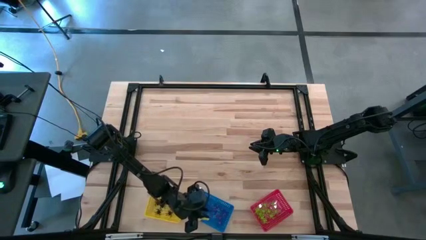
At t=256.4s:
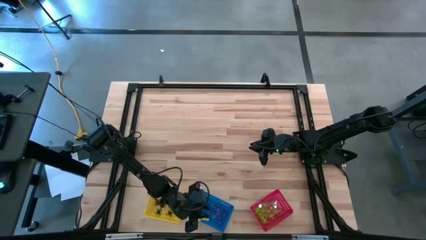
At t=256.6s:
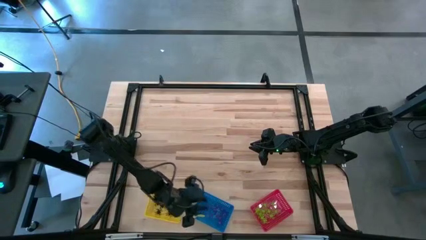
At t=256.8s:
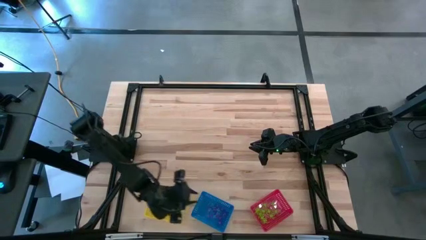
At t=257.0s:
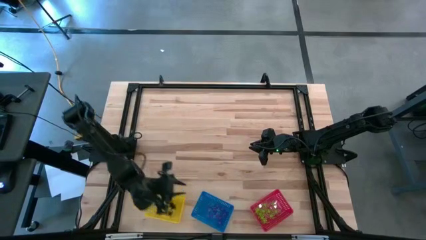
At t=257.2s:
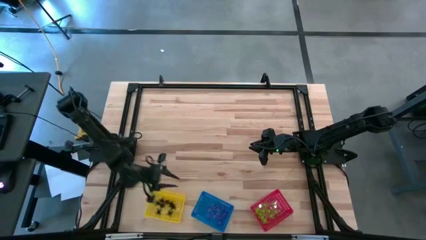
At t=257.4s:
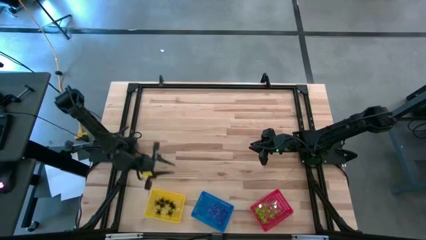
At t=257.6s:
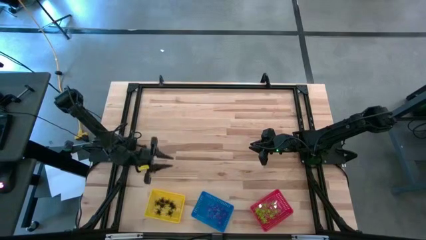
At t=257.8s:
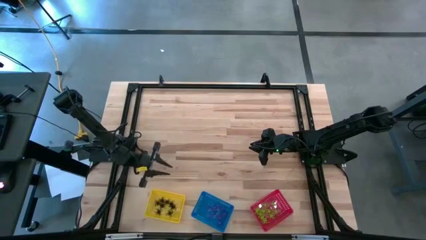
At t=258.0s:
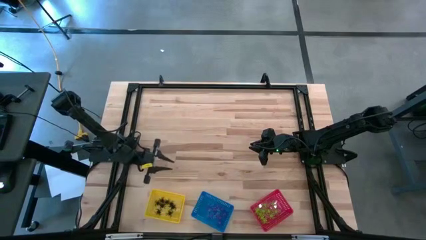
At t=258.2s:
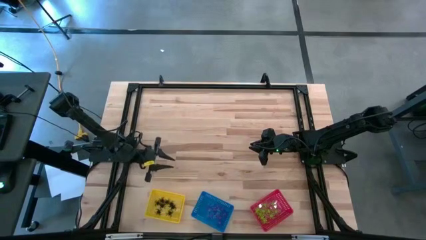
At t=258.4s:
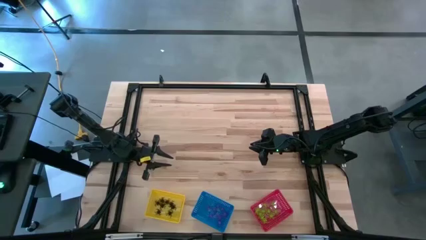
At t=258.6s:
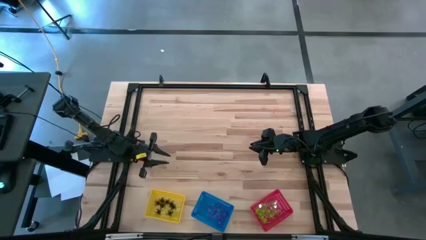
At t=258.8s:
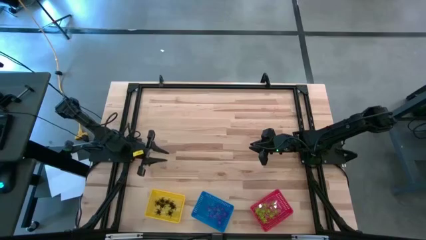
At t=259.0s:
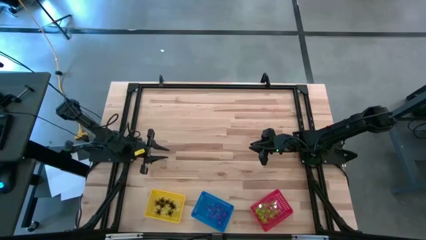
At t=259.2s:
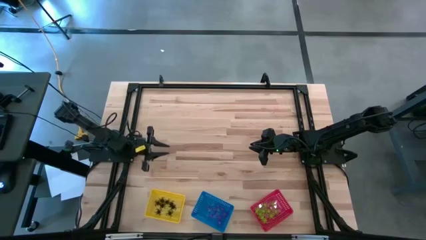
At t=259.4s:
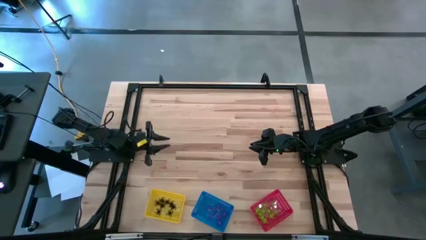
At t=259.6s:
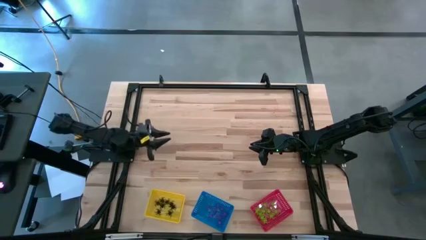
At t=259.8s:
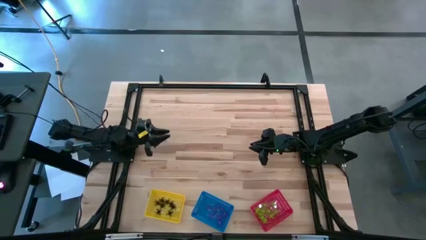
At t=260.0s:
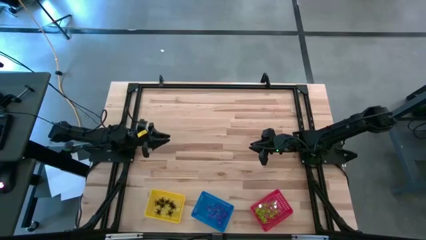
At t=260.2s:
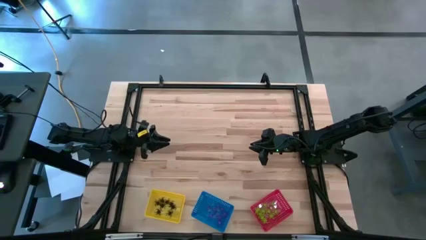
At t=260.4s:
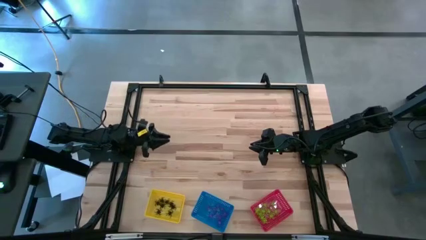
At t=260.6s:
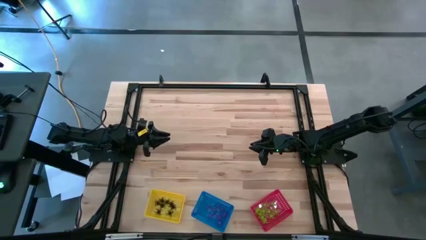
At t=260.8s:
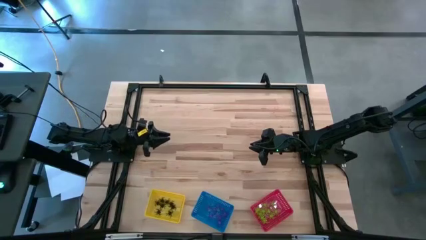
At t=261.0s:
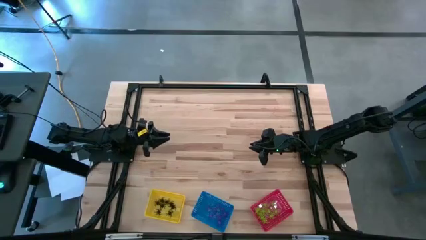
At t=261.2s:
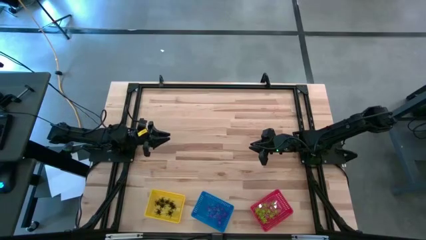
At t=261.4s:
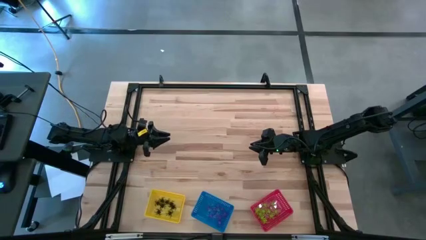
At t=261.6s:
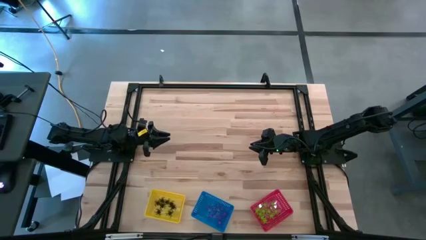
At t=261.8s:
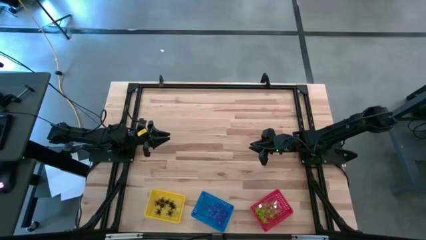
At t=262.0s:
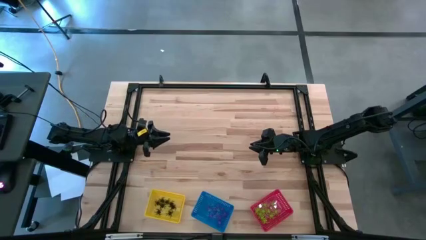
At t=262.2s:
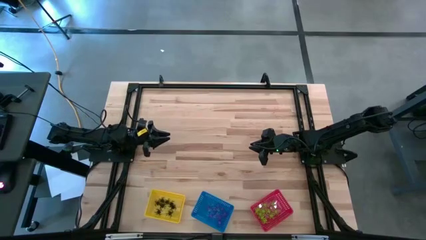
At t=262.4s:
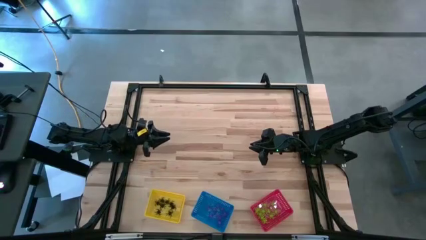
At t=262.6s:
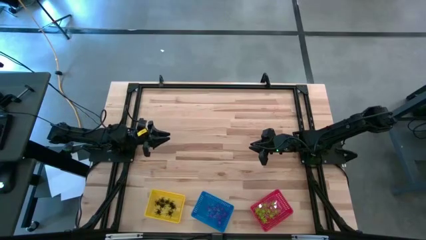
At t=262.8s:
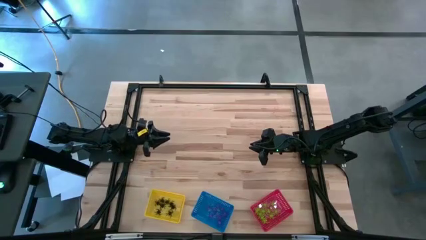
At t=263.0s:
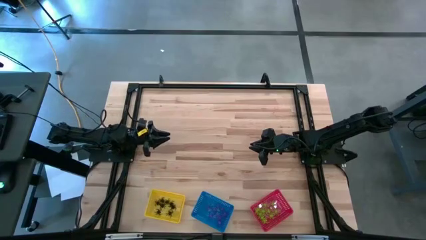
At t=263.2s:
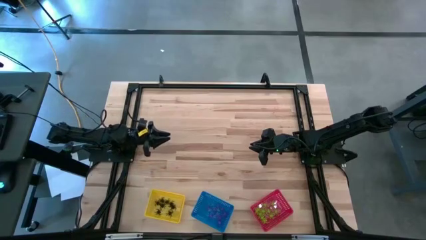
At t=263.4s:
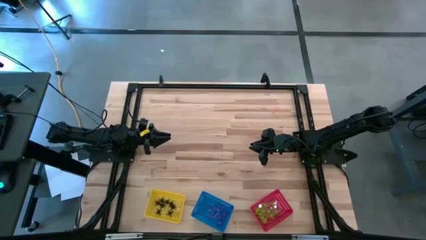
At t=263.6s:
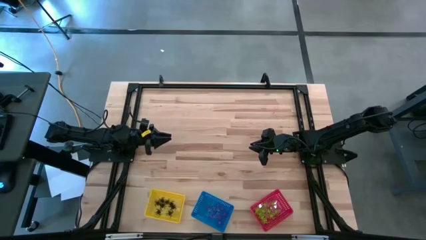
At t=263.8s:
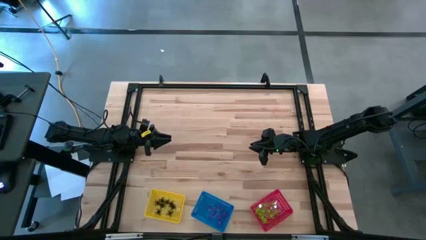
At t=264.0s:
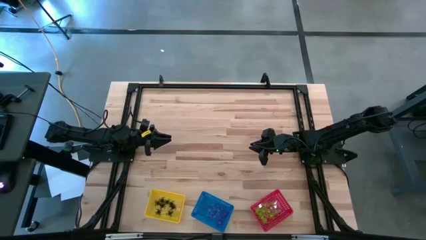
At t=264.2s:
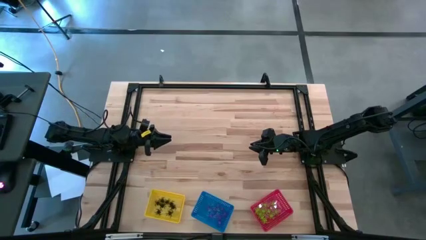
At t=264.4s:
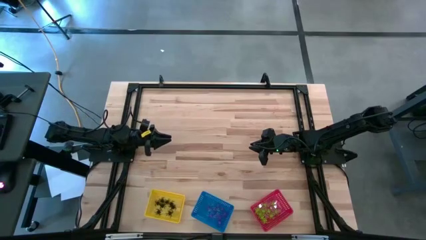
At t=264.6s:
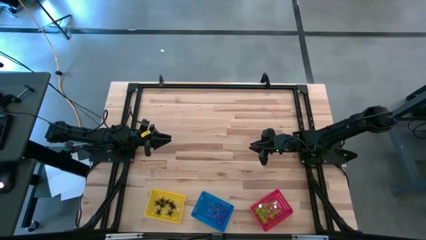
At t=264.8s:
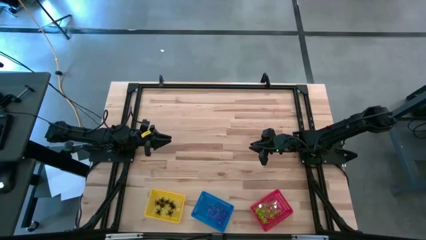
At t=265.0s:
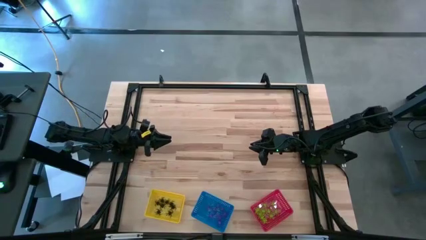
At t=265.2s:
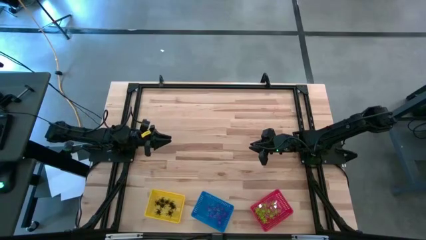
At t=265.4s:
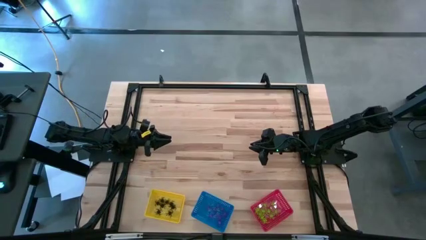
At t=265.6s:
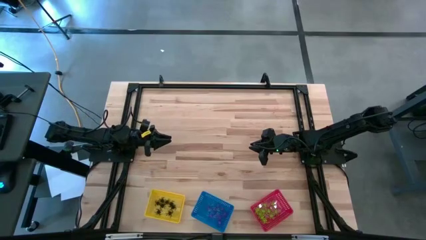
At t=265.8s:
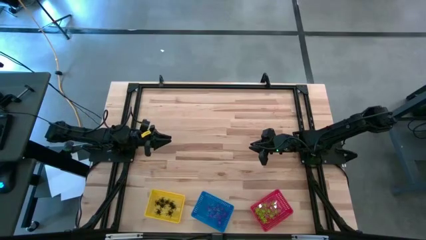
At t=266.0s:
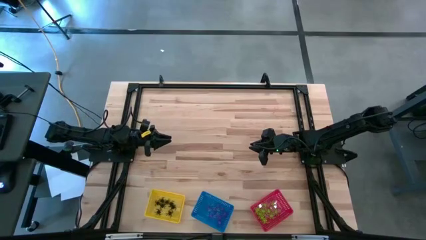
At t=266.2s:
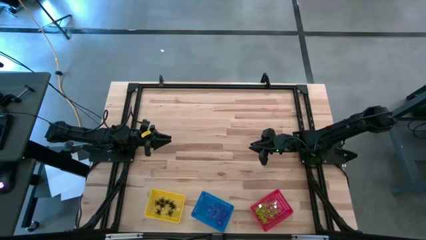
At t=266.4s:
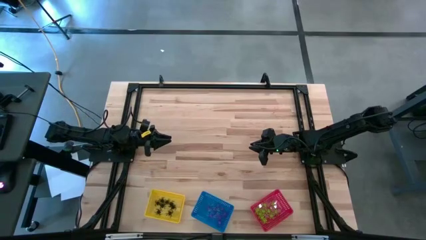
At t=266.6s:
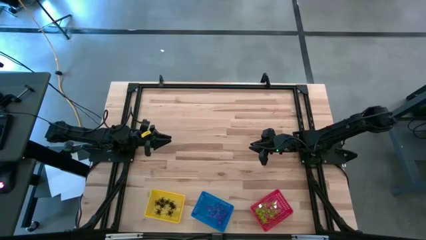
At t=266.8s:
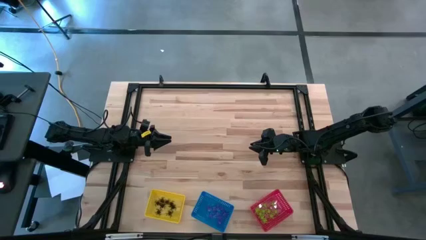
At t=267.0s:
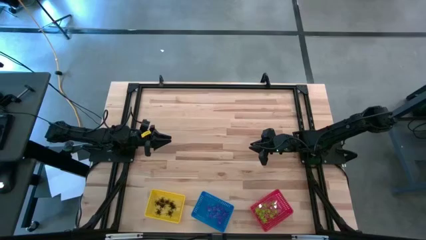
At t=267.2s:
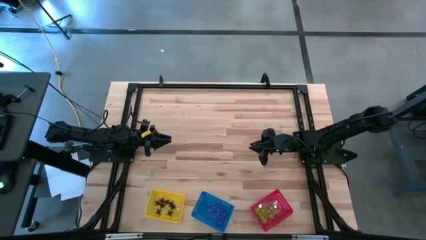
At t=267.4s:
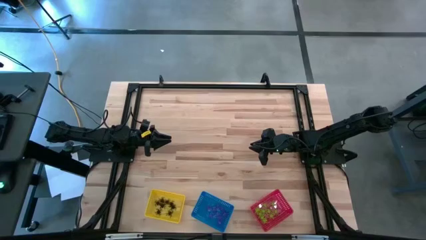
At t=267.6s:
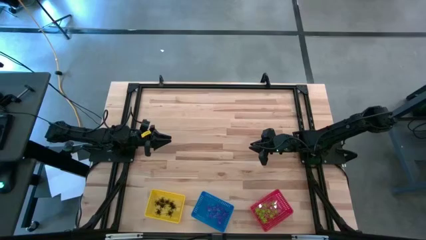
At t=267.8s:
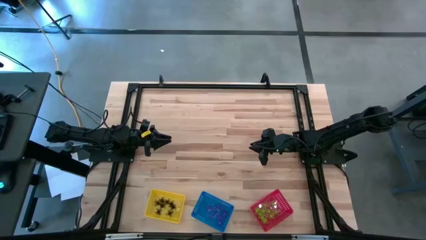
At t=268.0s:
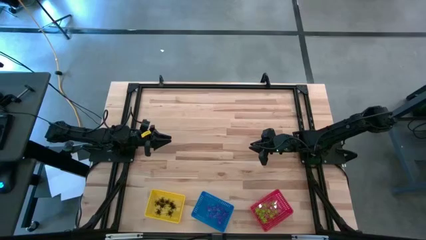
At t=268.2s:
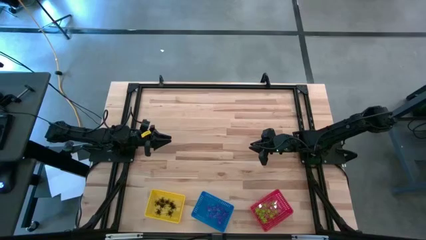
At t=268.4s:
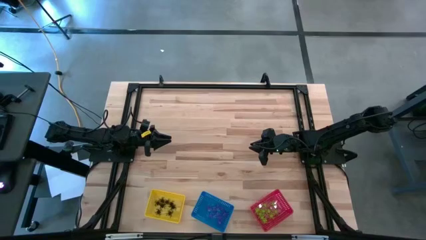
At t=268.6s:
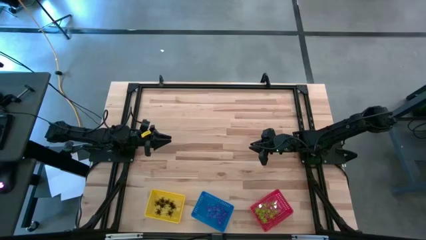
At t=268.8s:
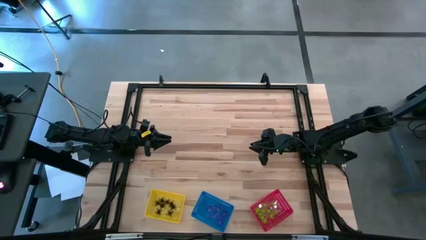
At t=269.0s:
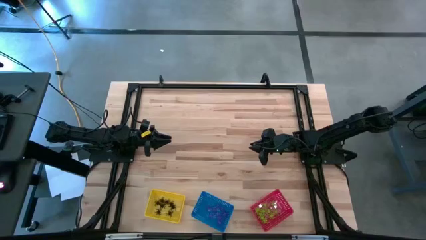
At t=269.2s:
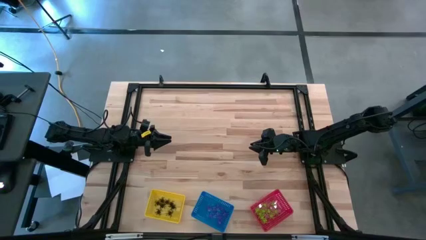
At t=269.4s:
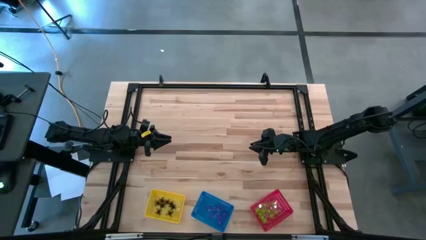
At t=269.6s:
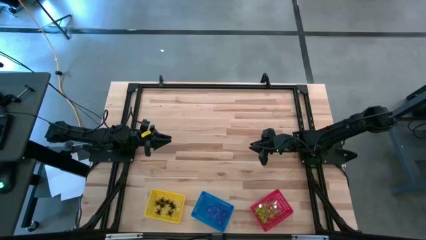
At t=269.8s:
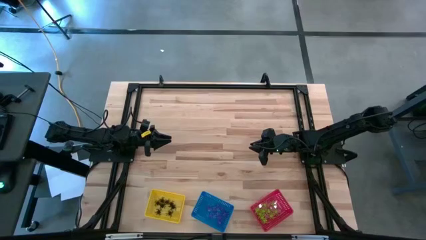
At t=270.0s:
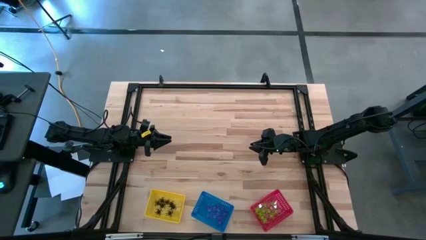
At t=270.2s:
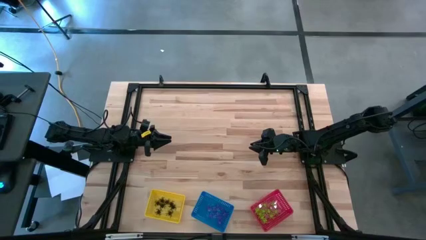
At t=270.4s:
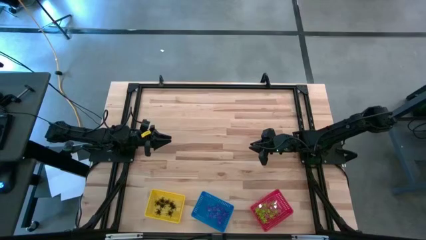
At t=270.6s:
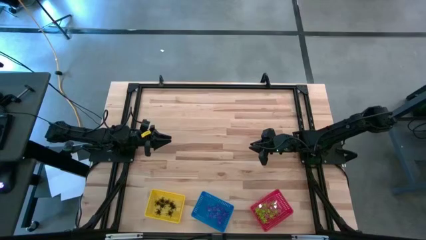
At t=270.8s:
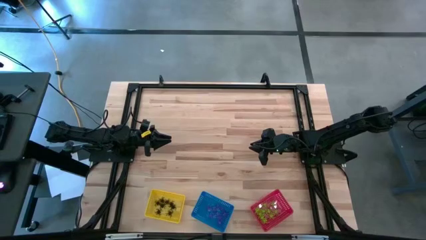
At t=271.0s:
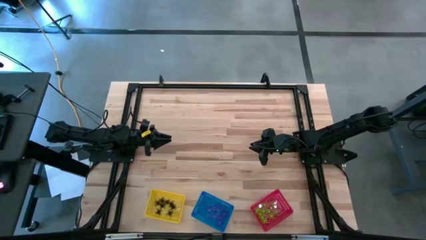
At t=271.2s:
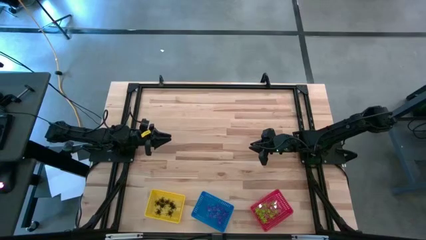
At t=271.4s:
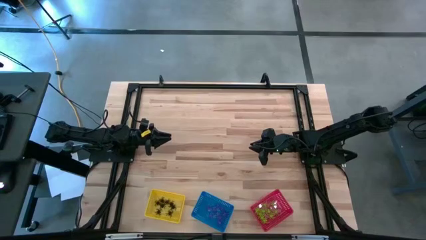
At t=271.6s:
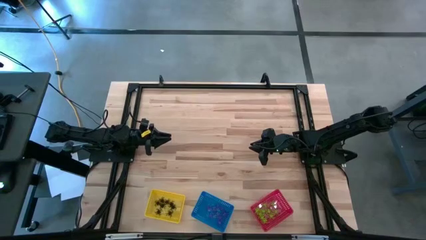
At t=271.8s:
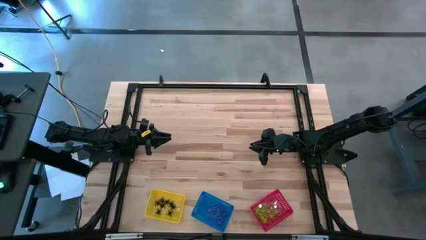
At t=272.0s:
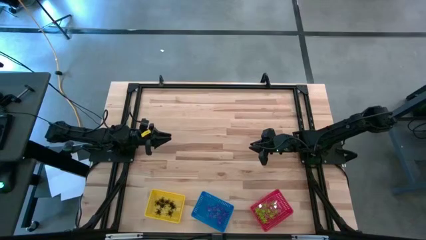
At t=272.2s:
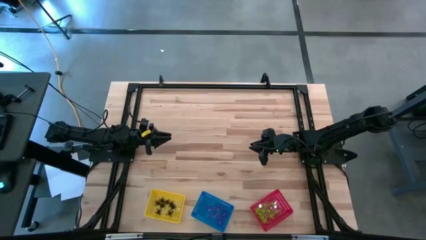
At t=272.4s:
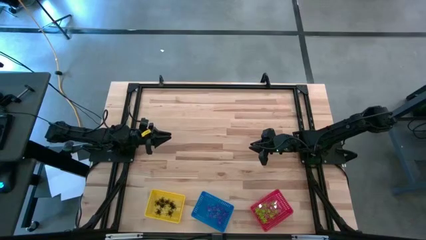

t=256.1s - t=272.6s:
Task: Sort Halloween decoration
Return to Home Position
